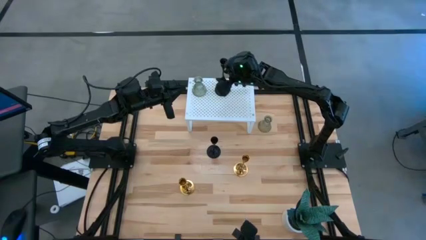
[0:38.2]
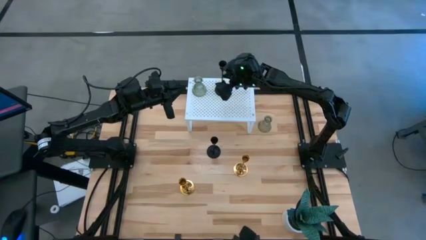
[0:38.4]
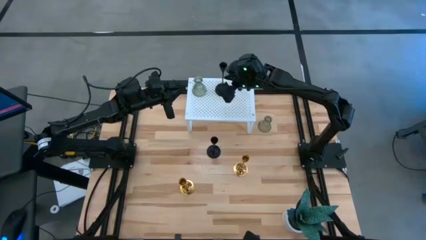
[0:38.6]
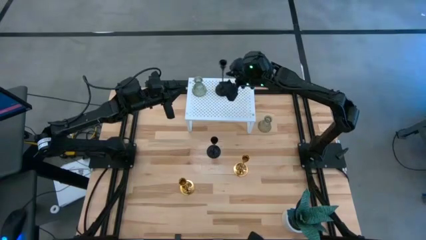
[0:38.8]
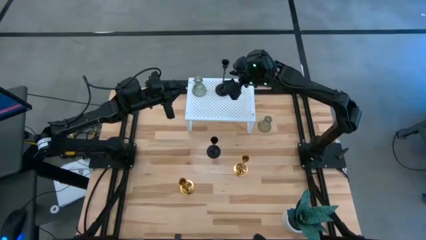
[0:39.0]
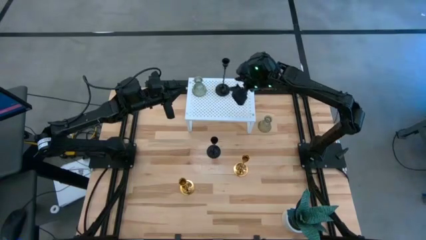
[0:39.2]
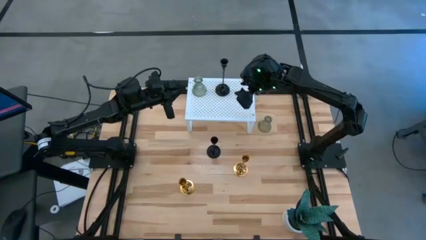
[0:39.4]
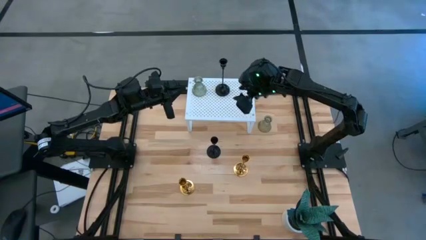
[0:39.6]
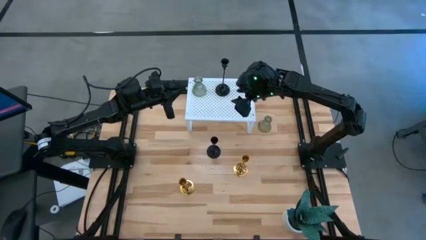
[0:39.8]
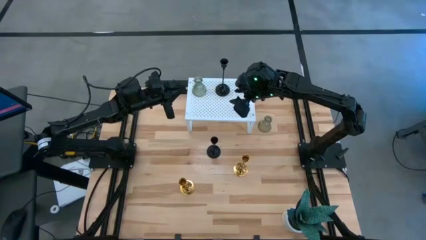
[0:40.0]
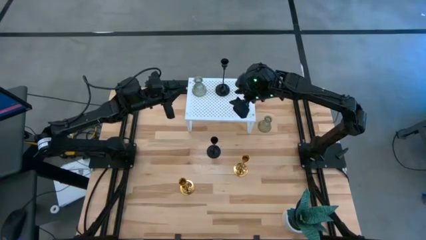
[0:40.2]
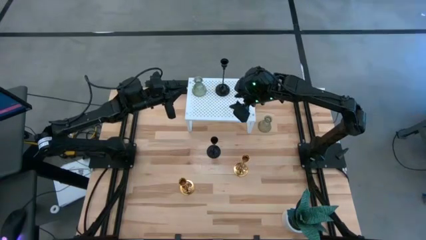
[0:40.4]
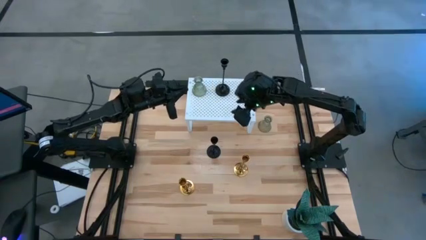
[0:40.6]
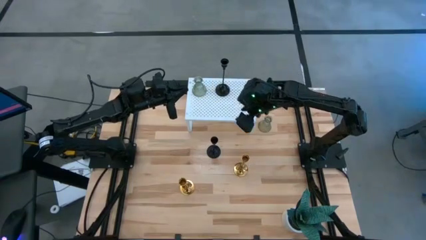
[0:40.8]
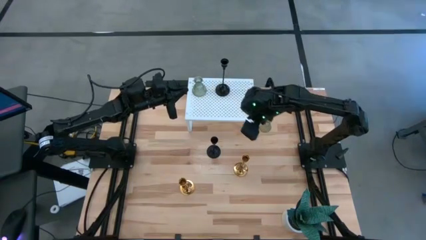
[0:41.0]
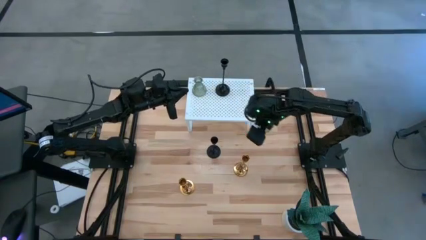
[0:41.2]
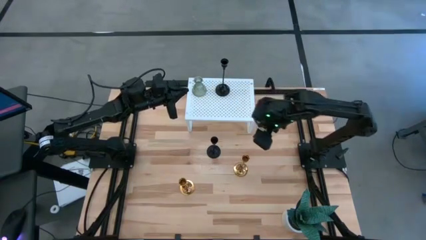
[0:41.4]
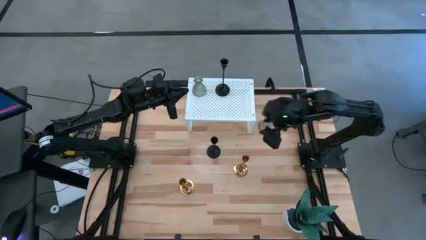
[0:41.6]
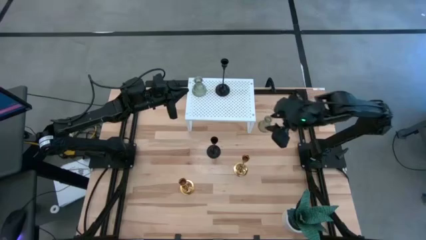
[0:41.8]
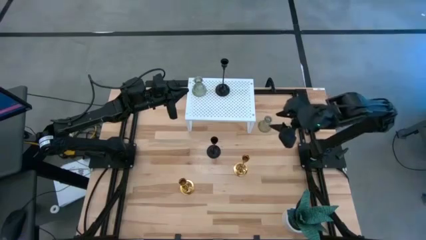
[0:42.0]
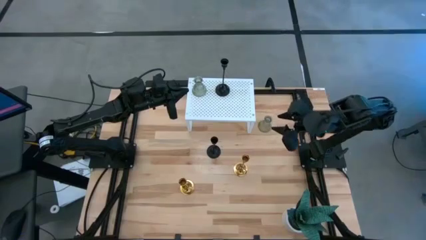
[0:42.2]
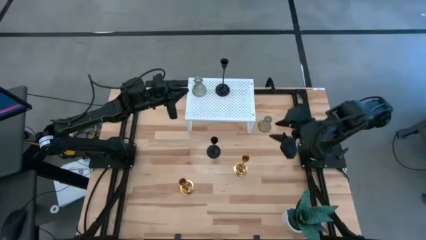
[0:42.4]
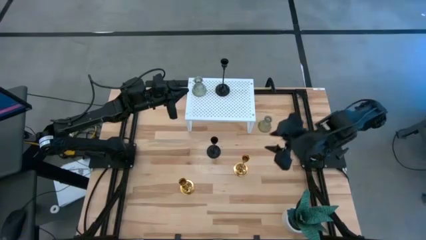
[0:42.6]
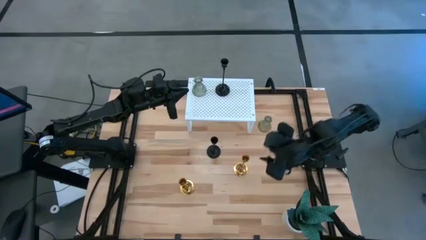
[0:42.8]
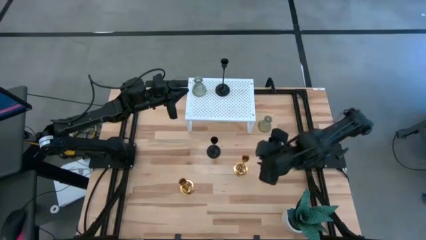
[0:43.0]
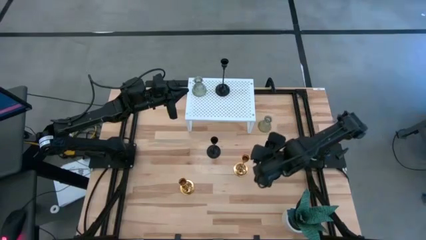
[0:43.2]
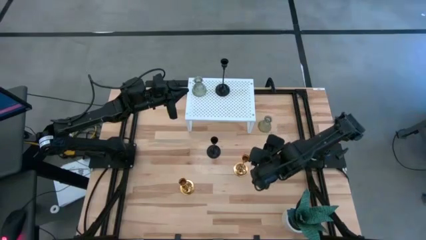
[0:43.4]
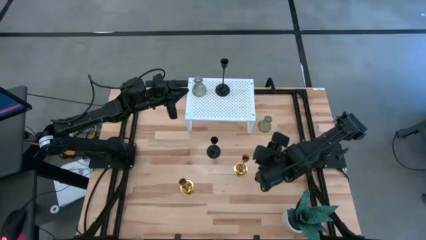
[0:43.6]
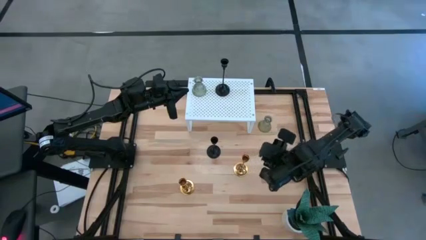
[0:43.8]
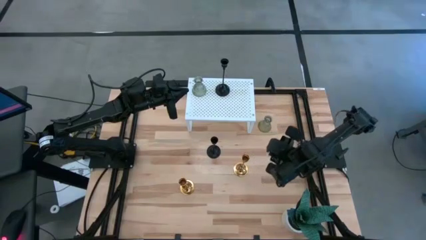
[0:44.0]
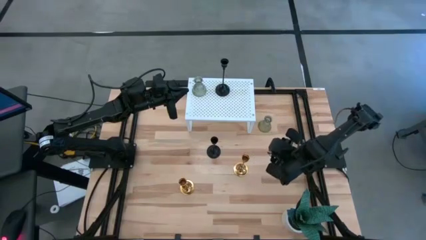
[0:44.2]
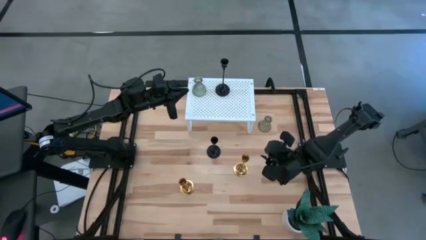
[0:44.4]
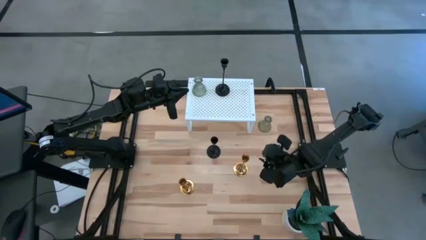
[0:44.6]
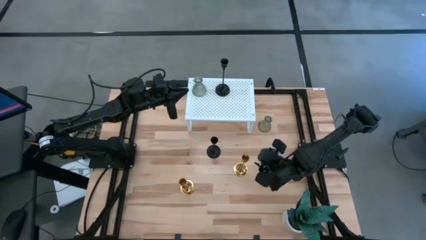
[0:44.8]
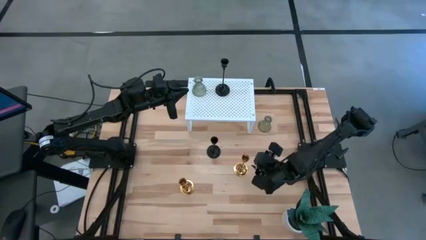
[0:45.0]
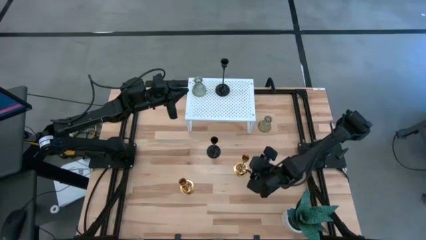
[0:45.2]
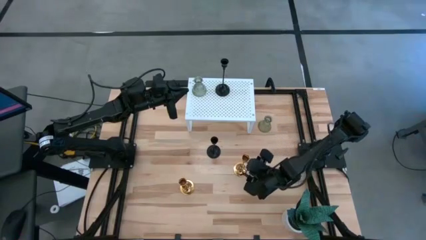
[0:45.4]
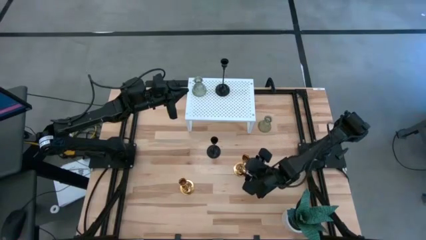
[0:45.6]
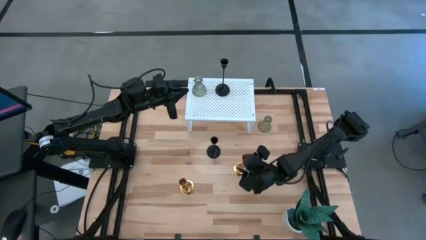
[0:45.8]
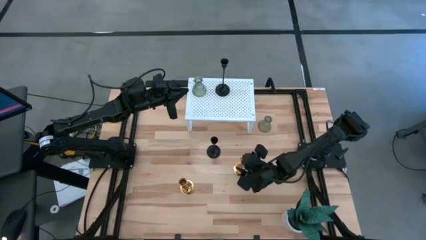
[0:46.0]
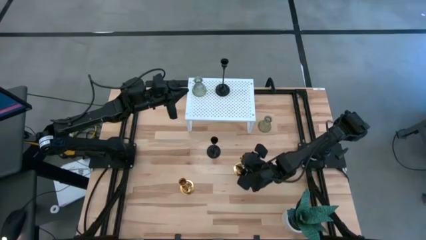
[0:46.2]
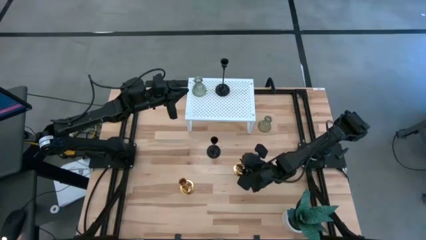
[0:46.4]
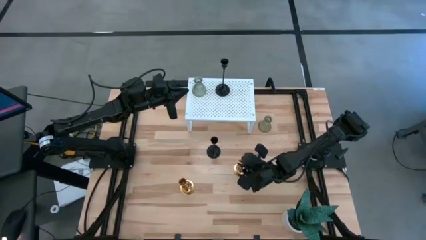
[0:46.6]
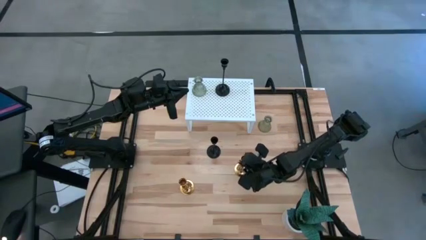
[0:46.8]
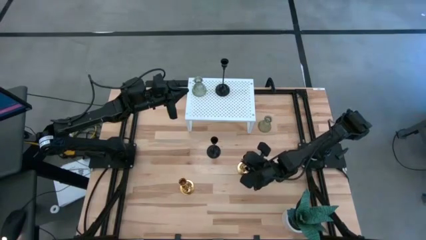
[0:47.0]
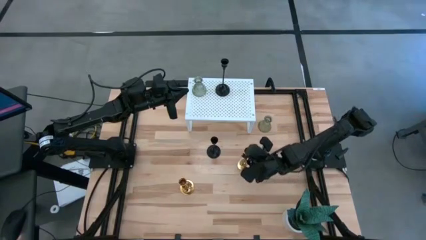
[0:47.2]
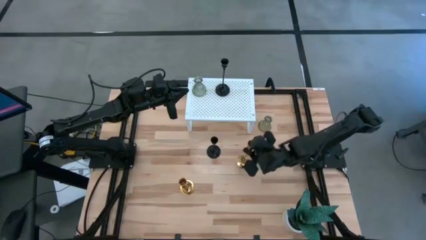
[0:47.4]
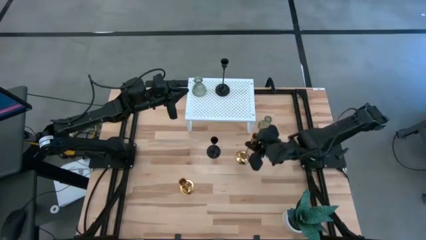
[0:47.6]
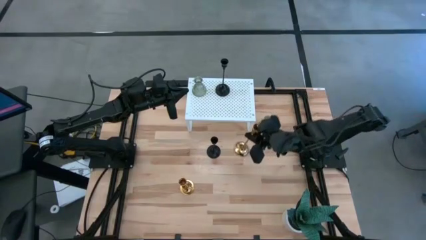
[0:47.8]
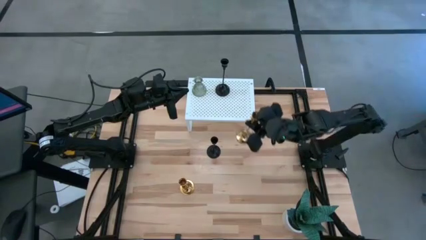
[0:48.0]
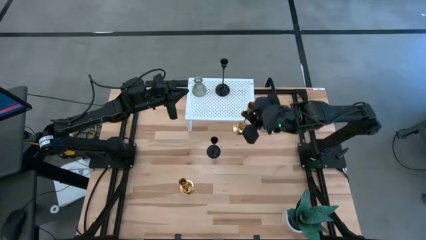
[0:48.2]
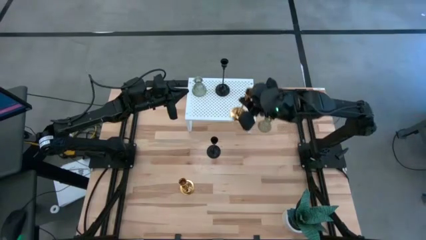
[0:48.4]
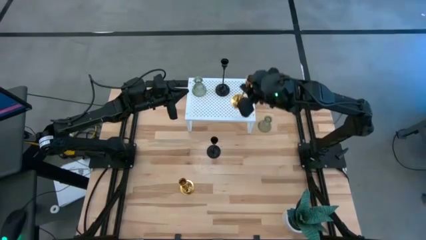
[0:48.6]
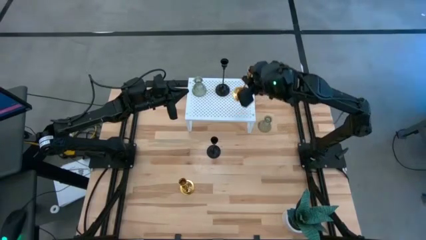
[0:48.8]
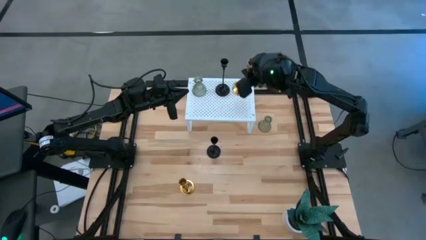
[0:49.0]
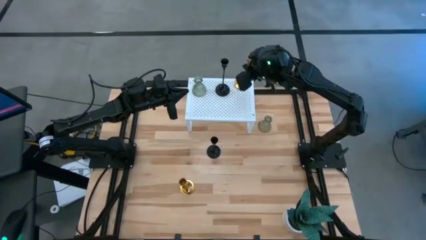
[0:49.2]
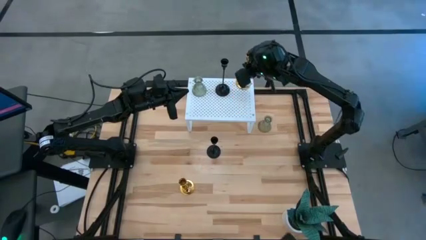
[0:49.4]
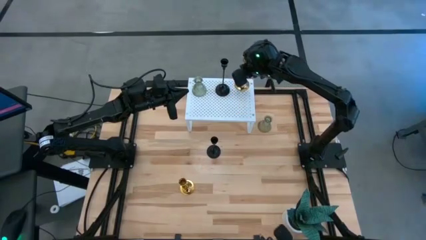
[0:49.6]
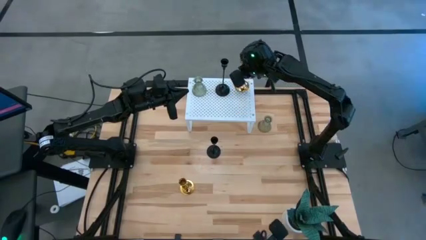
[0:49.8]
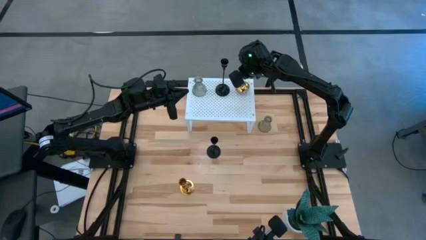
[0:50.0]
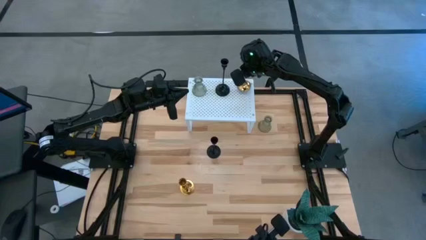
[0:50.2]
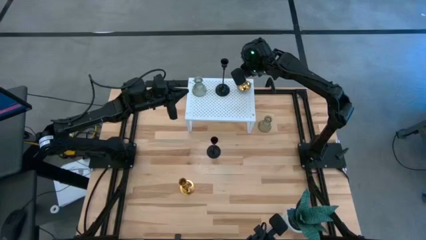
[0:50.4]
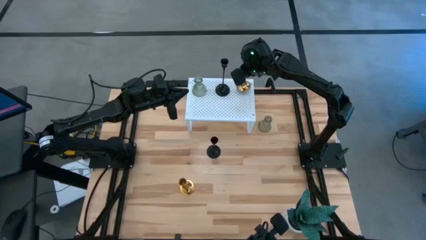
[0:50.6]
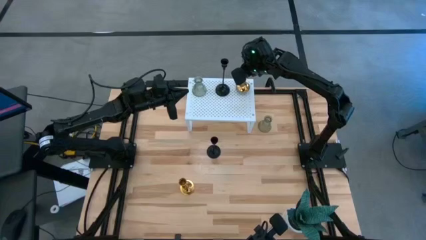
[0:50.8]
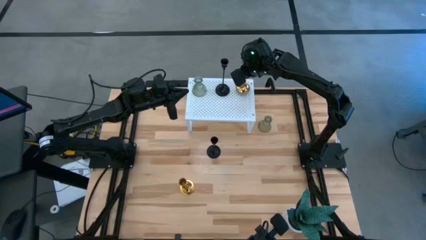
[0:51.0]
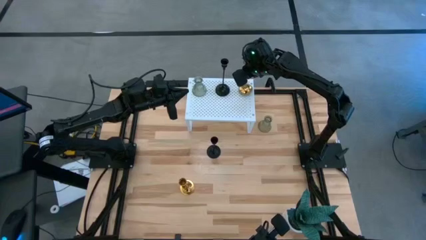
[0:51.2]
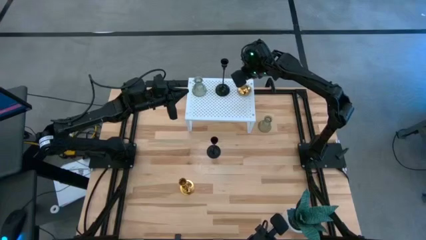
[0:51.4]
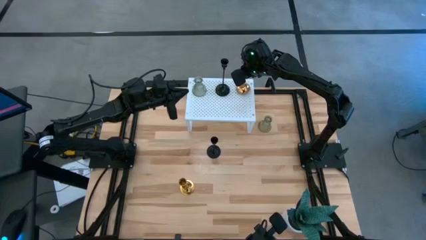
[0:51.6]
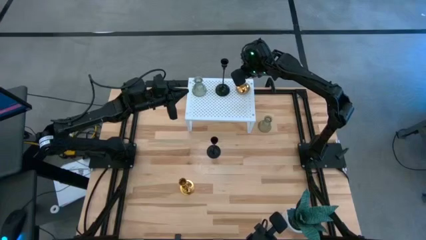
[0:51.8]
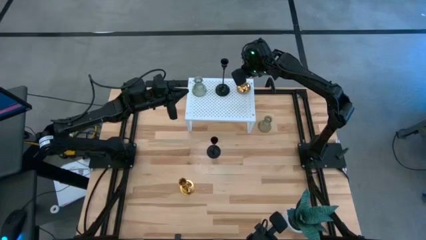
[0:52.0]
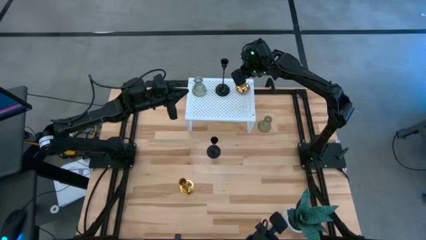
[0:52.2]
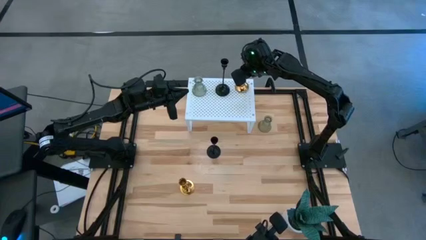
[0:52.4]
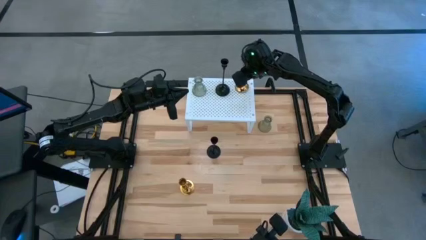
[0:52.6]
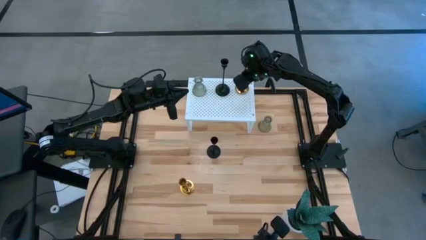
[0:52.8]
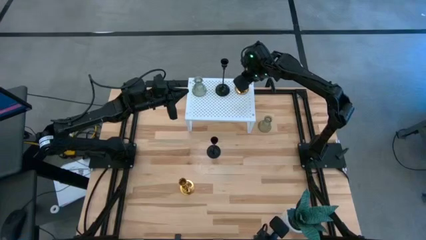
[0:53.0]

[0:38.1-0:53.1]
Task: Pick & Place candle stick holders
Put the right golden candle holder on the shelf
